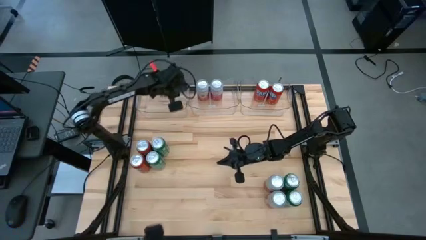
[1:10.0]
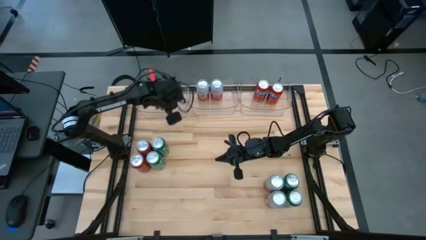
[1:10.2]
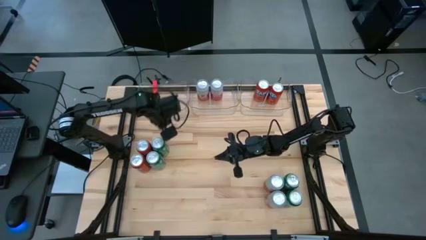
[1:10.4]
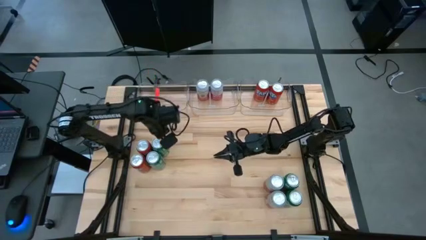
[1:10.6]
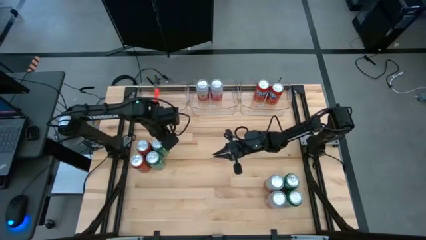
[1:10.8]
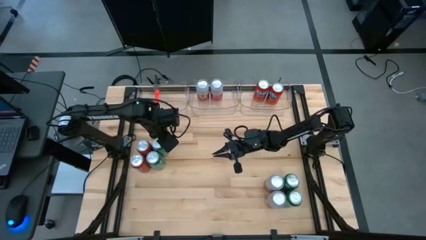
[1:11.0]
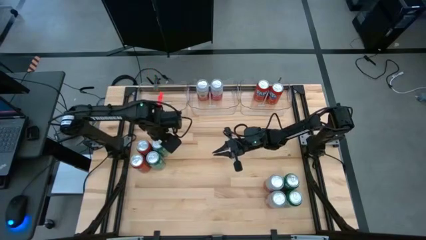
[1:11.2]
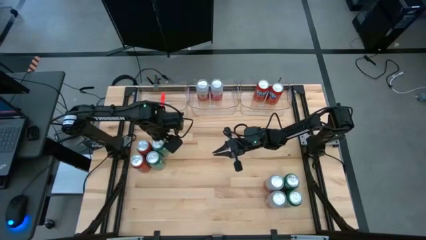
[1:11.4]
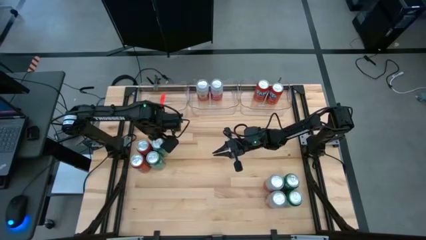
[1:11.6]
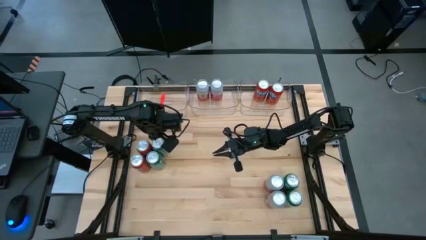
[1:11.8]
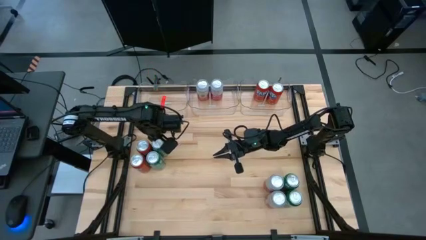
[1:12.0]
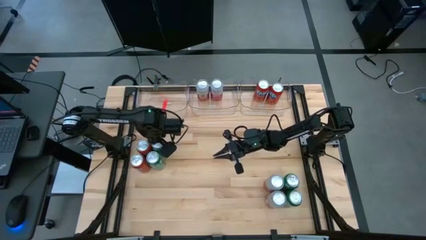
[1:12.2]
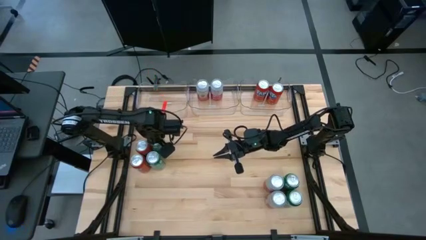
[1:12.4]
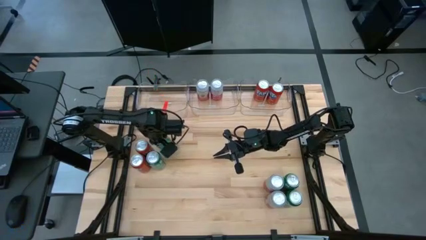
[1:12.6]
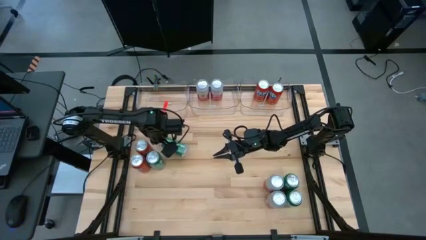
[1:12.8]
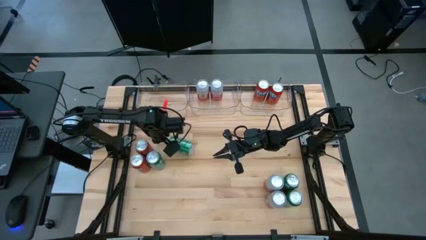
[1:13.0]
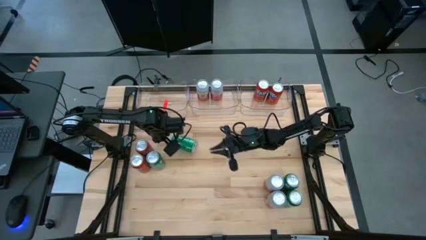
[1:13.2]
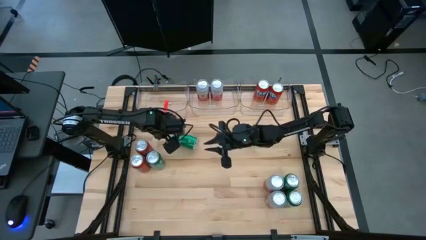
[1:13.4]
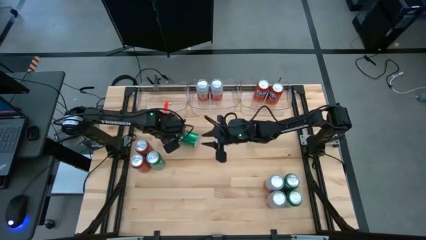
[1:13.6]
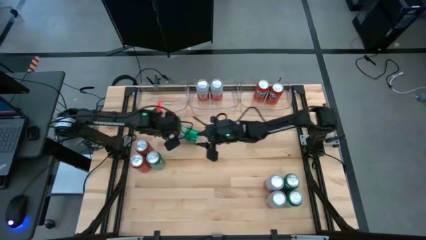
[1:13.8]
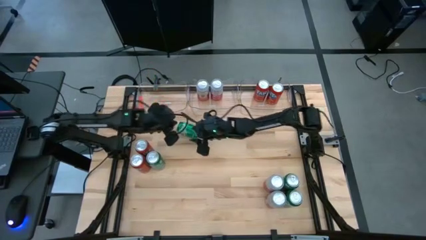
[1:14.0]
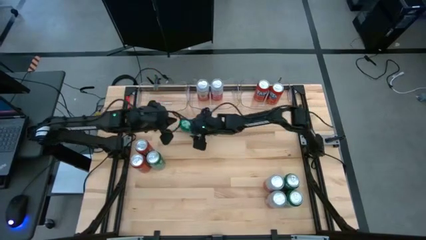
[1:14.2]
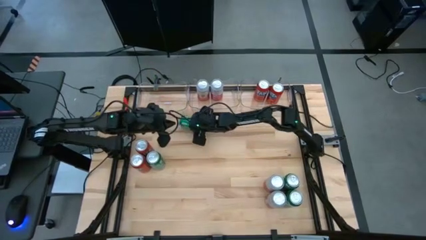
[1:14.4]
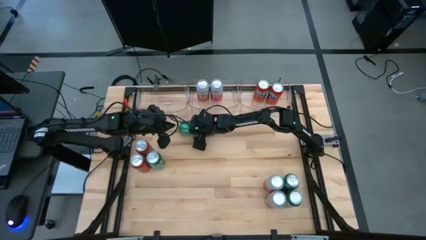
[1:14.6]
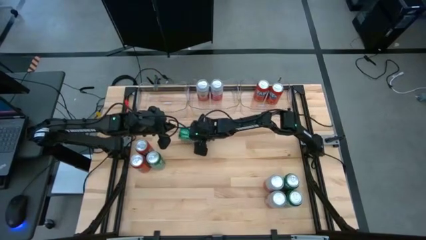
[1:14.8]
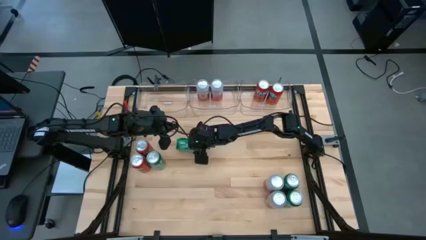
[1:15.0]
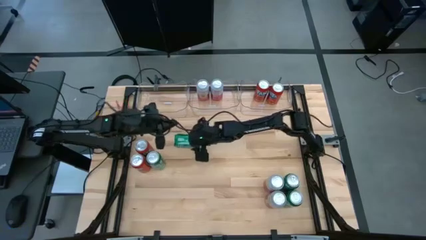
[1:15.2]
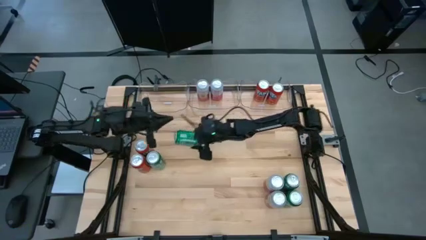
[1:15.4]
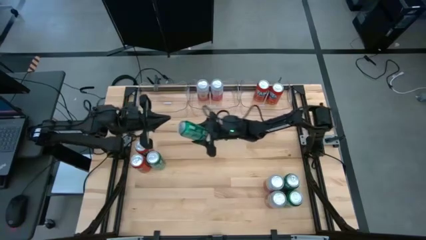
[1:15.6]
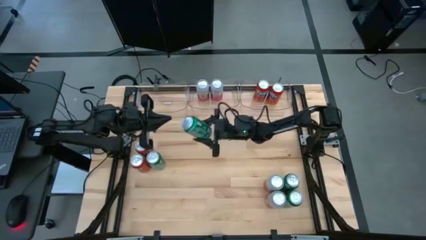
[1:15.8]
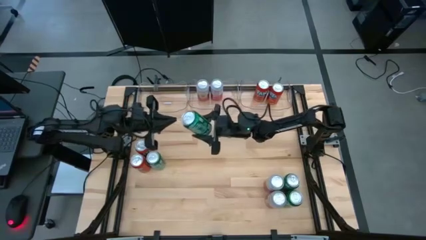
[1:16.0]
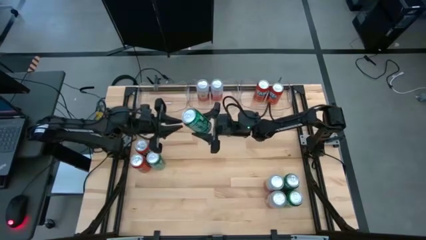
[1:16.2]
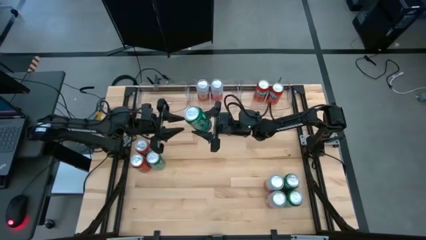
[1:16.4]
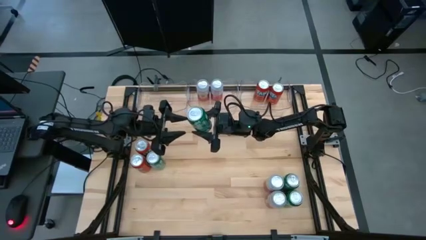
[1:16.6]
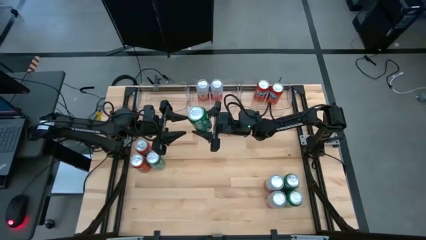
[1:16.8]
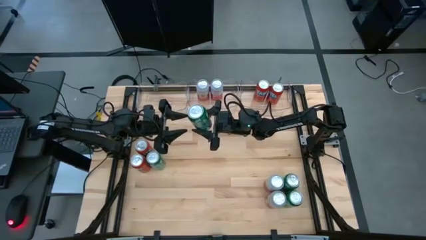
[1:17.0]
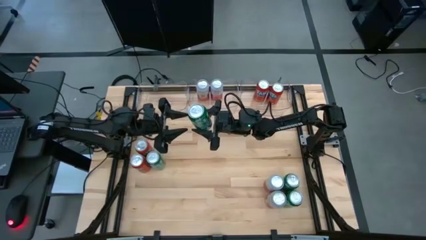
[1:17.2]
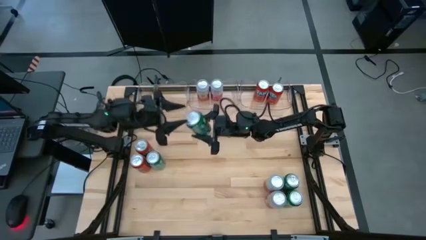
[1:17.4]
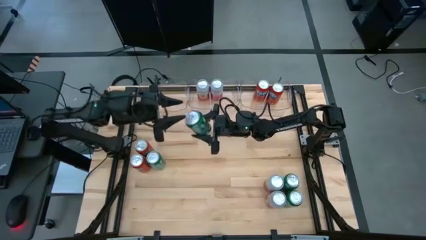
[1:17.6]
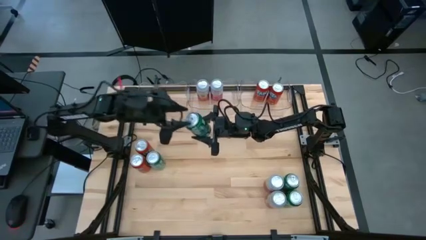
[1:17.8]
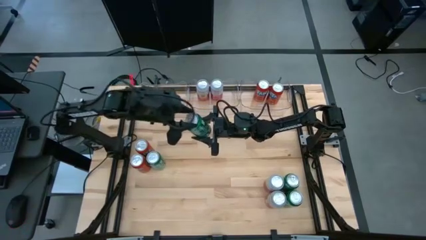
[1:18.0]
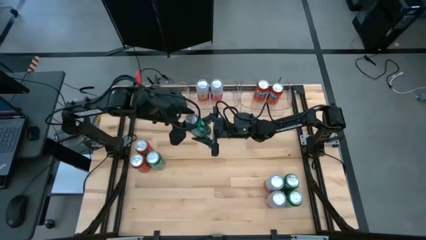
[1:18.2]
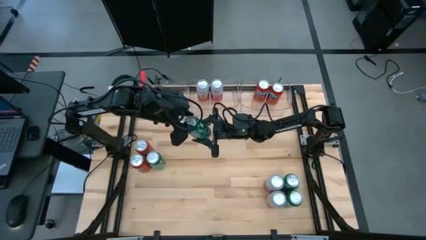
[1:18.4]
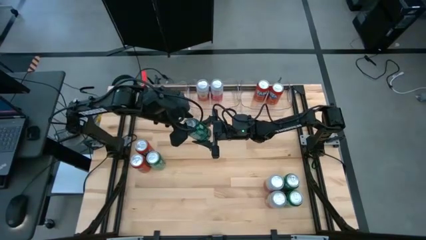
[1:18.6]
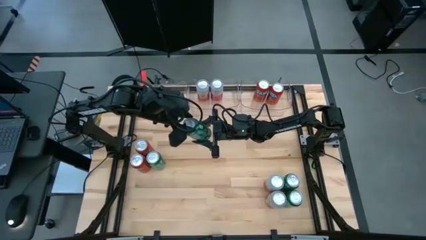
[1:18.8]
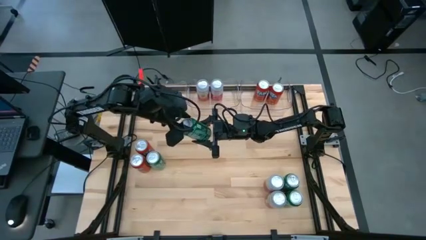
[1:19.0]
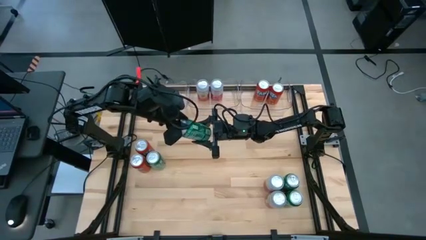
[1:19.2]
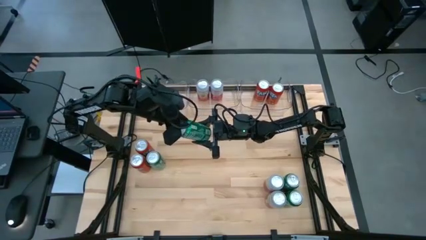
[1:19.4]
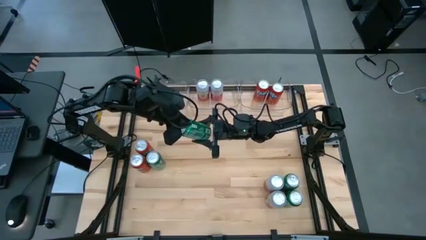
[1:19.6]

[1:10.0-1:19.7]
Task: Sort soda cans
Put the green soda can in the top left transparent bin

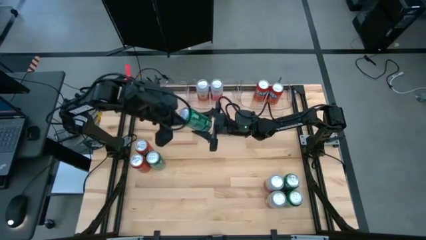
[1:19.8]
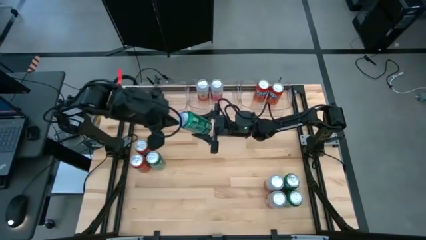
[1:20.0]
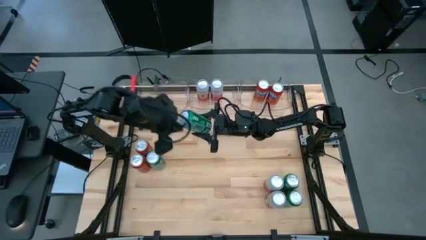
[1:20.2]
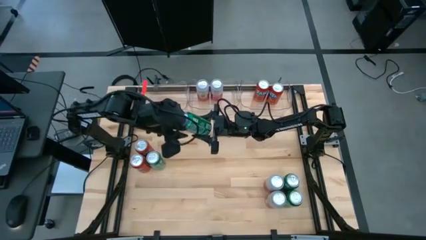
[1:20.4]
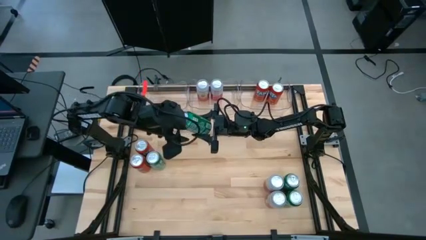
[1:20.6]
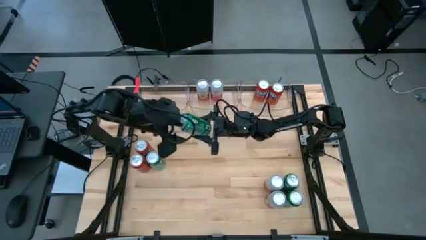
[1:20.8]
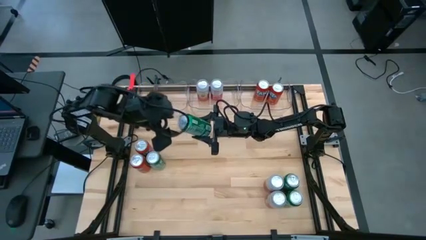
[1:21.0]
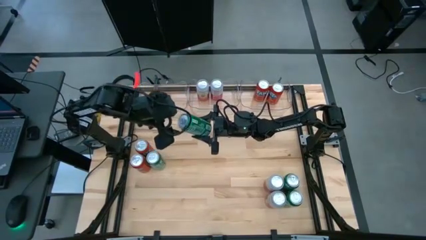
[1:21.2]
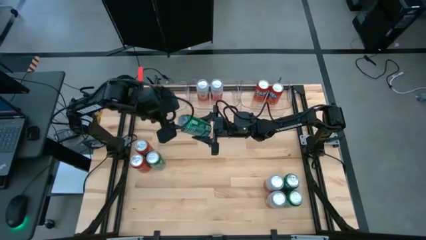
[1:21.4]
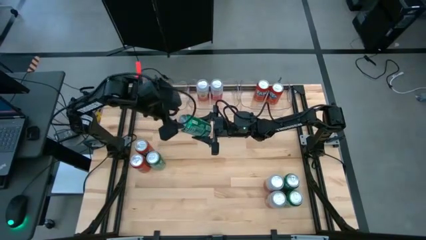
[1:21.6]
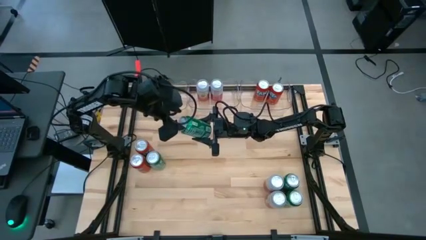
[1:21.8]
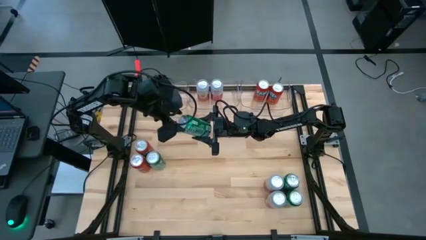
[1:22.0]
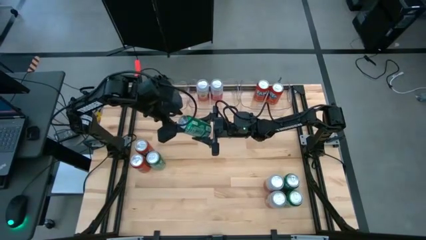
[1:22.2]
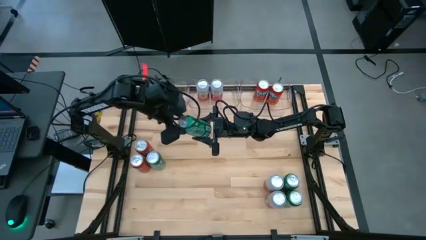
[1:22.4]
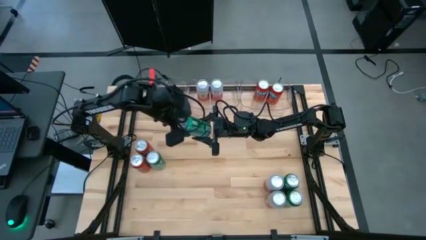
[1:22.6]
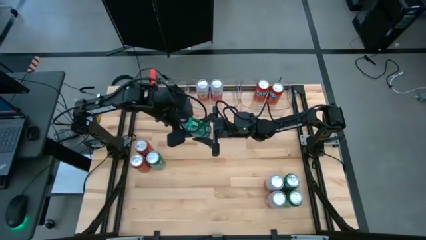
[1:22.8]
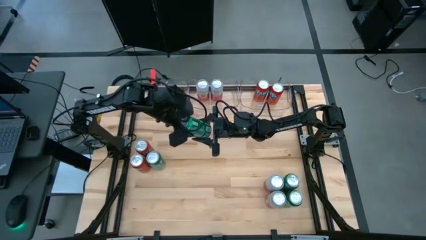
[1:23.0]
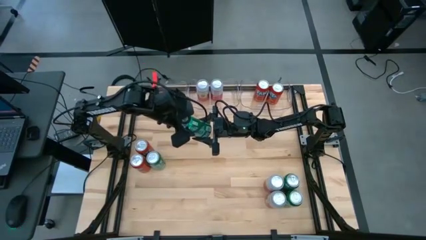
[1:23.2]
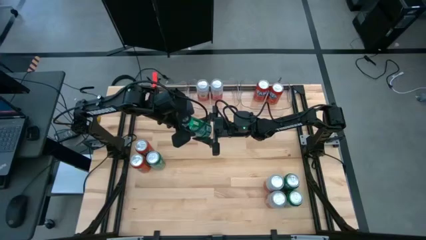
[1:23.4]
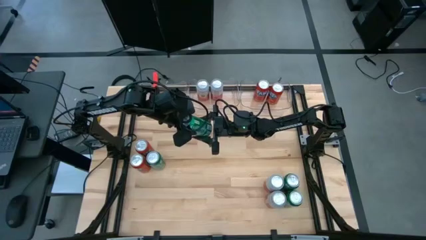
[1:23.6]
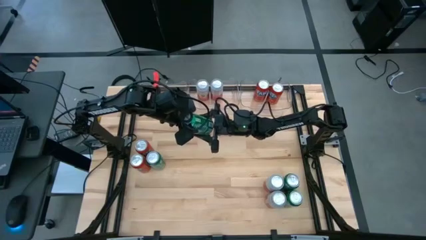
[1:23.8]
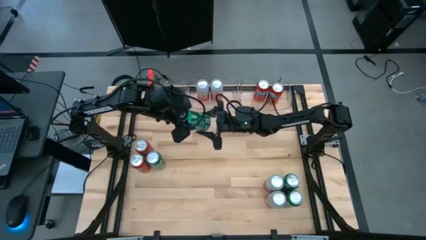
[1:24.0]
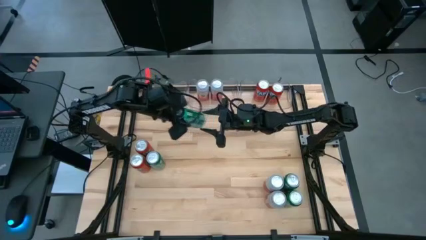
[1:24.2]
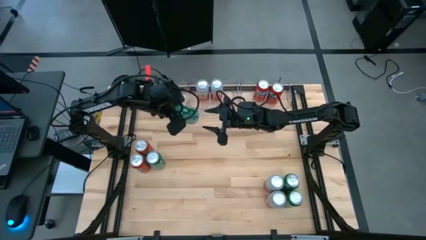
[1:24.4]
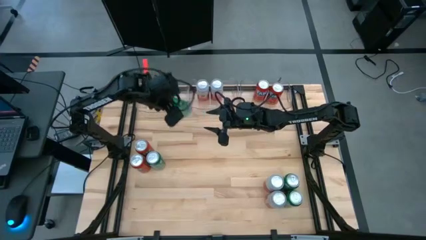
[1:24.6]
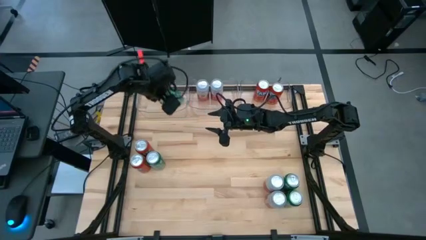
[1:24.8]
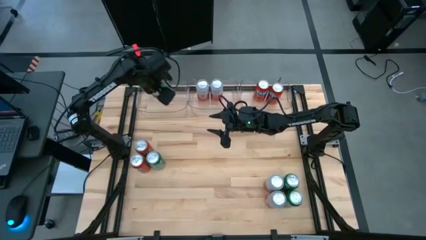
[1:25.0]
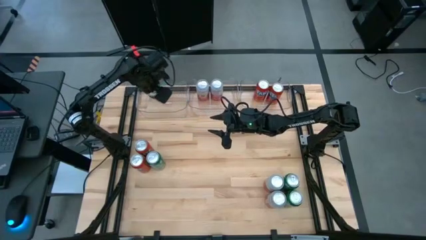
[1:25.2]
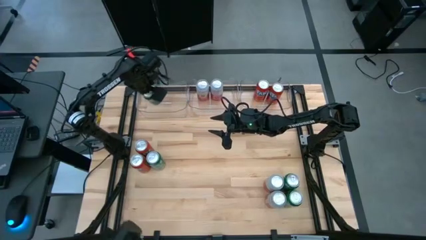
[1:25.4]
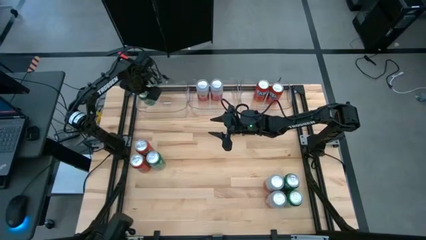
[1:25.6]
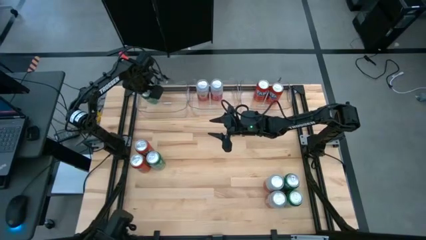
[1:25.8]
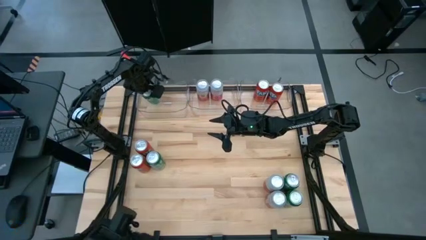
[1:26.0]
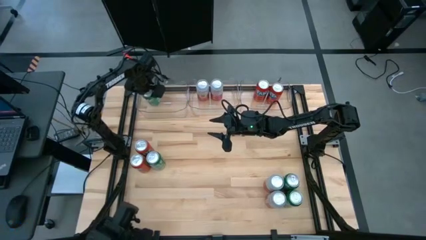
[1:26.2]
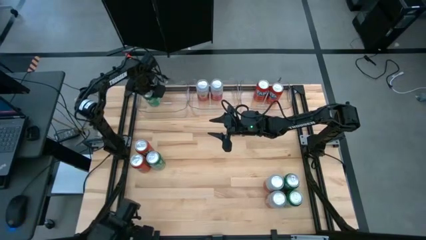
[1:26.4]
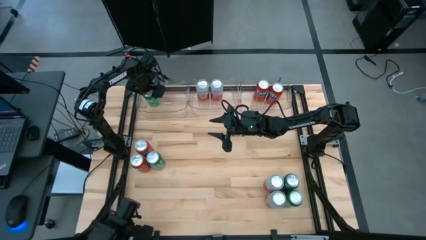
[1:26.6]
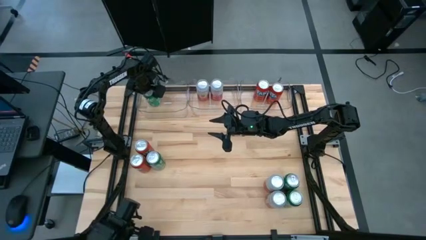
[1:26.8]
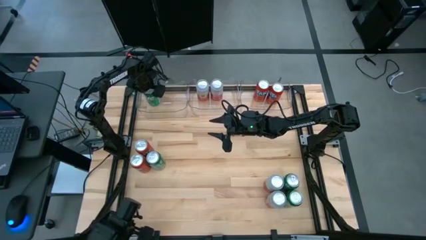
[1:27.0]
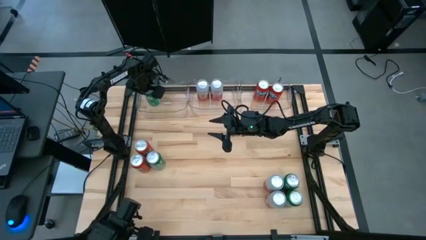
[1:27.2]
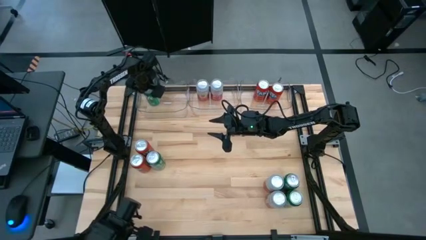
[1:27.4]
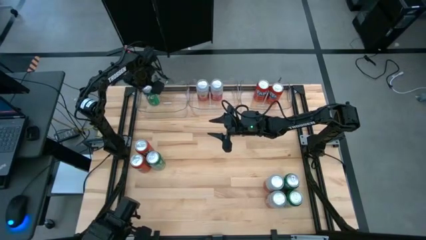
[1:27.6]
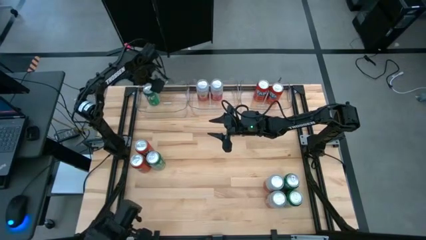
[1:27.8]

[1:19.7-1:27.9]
Put the green soda can in the top left transparent bin
